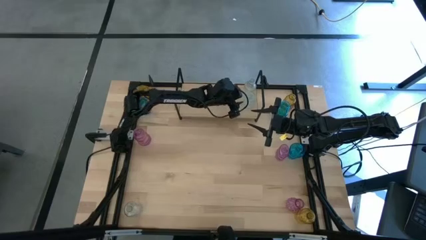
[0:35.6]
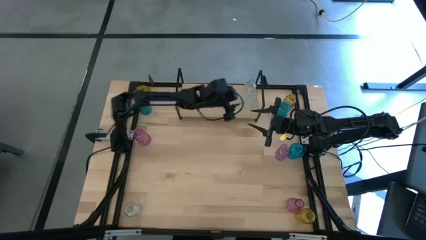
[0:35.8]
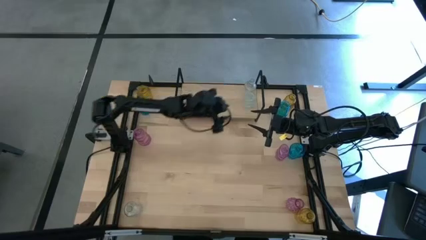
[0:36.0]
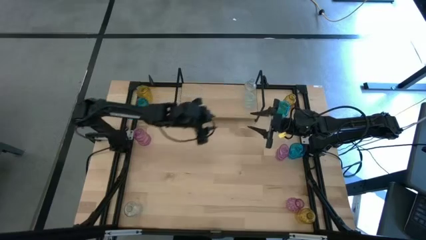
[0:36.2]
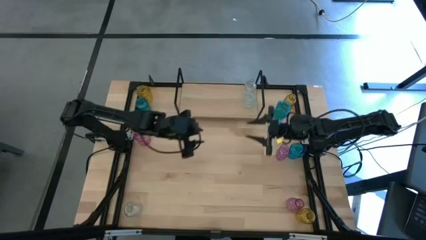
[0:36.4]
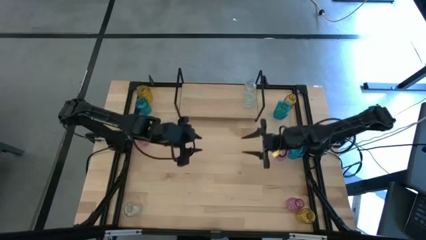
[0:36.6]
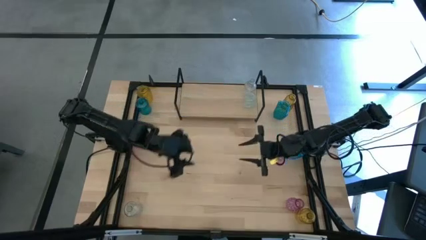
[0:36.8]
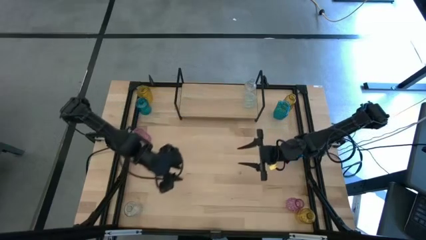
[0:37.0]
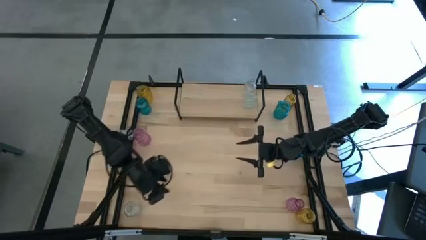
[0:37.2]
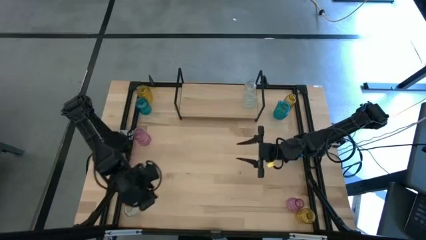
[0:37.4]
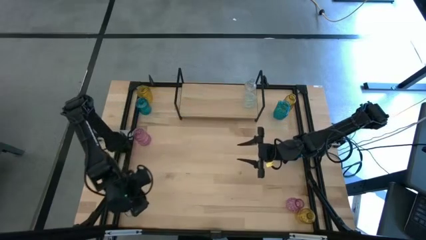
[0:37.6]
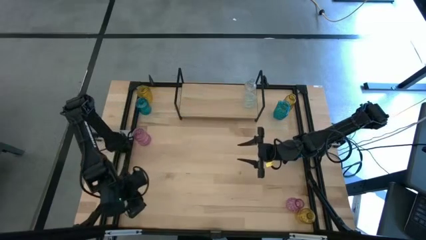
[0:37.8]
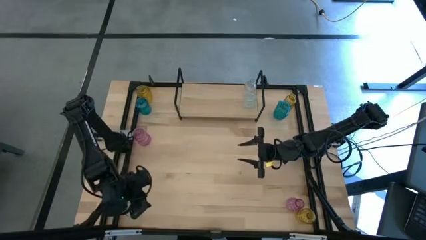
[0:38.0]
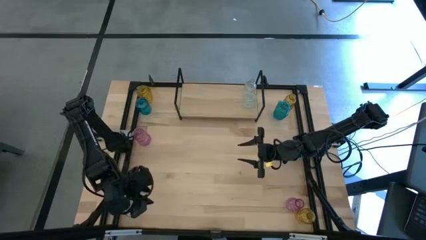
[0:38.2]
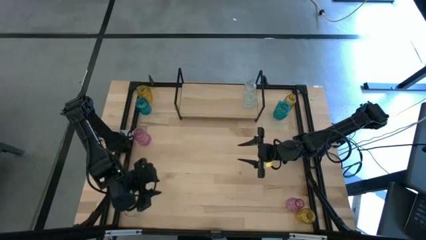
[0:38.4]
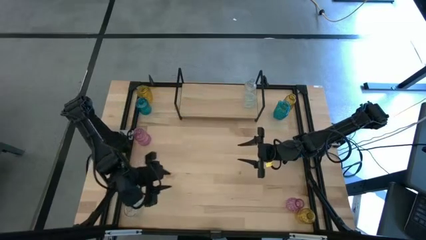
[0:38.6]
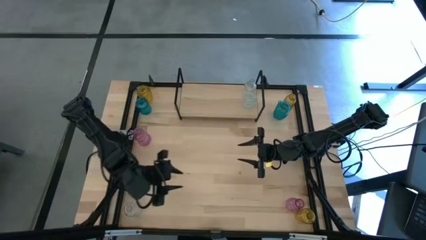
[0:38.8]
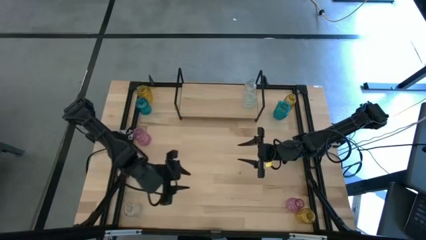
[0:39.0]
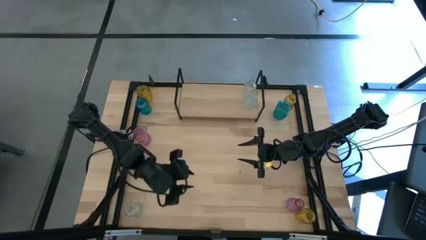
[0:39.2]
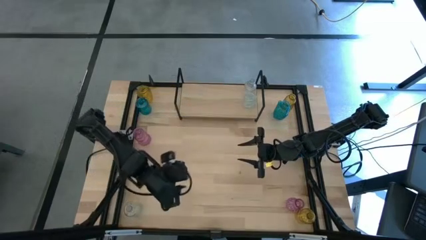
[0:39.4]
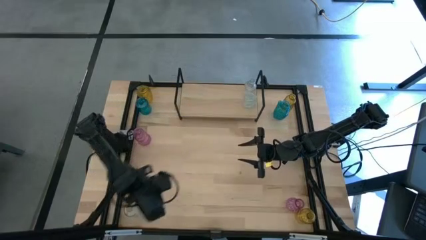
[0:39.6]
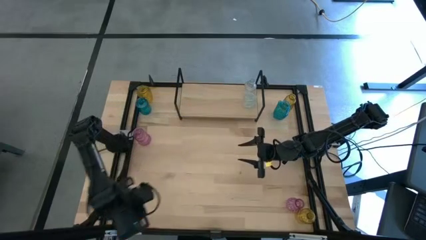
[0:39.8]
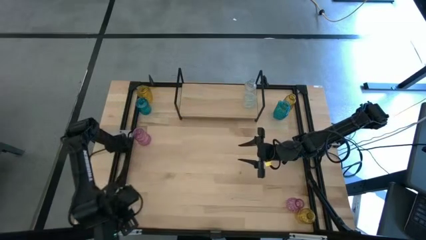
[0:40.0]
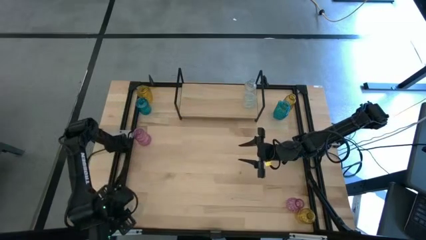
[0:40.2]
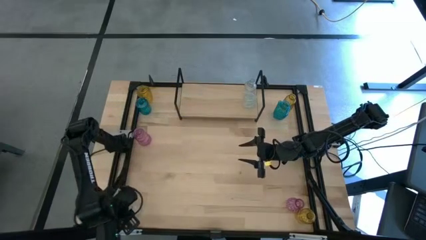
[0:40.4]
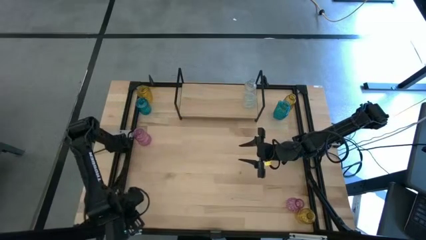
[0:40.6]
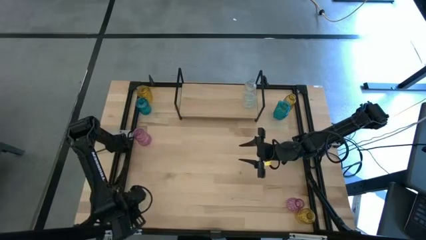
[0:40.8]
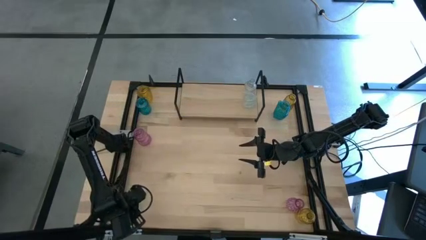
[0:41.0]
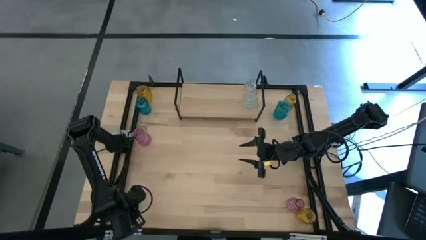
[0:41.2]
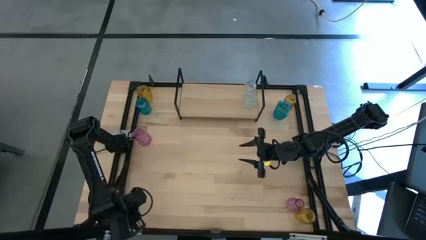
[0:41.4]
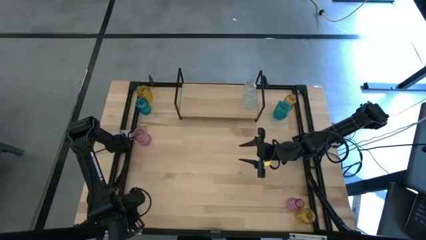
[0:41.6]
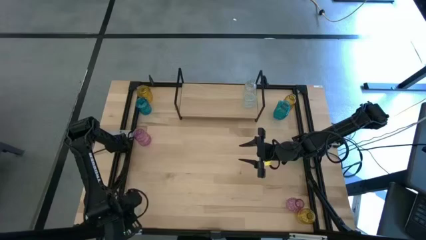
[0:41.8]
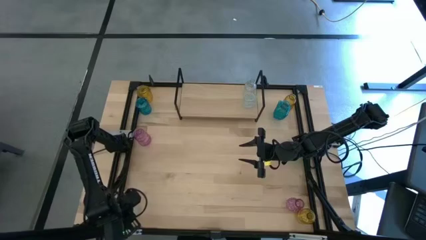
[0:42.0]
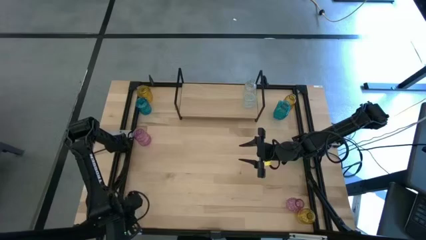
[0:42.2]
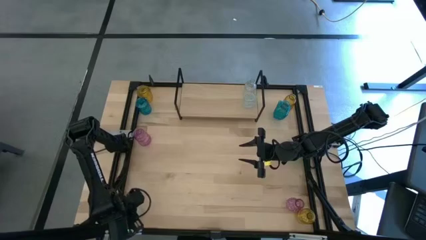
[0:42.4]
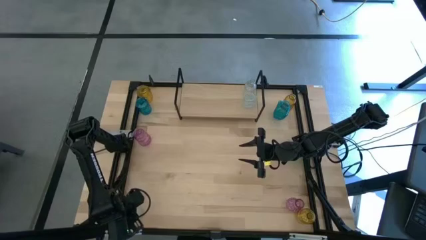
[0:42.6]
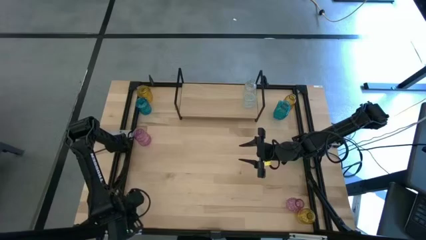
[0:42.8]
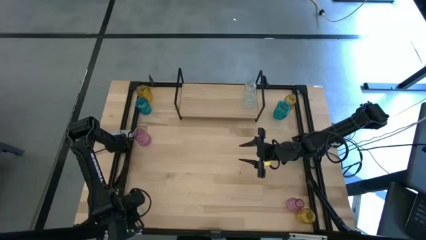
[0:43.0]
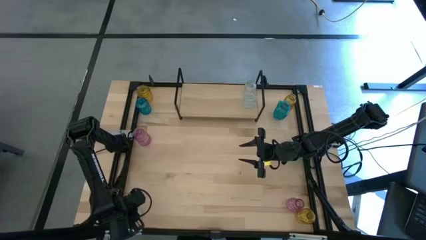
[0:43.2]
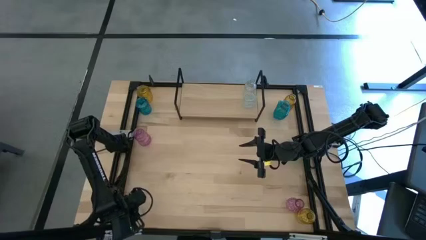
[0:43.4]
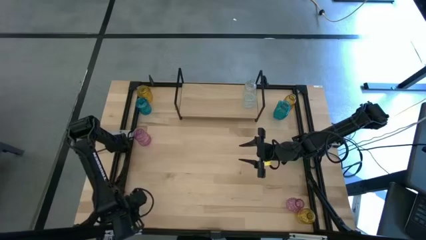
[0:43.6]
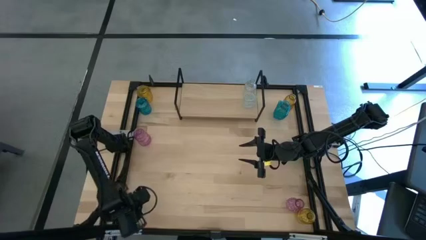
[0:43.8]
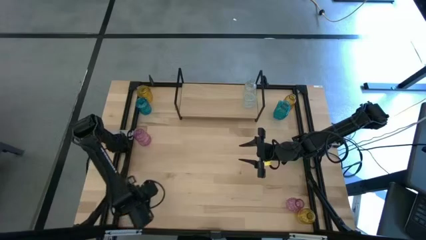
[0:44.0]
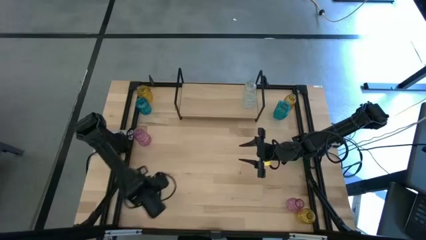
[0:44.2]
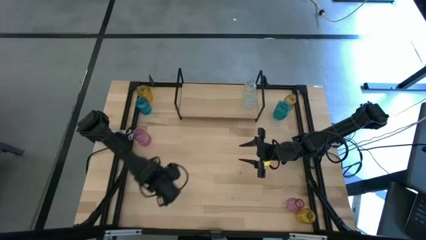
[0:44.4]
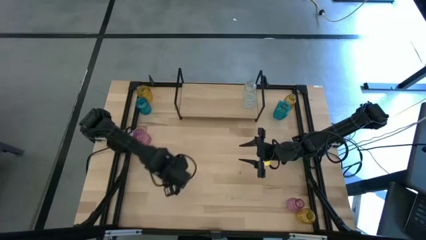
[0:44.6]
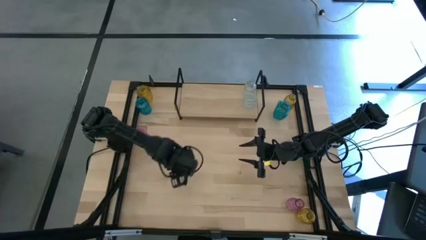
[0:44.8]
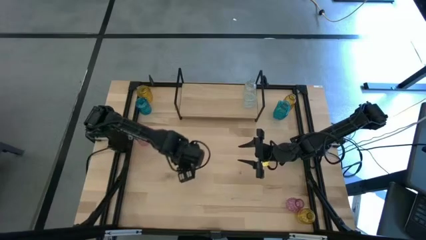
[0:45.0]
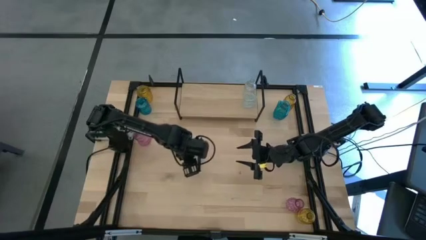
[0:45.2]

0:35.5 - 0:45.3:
Task: sort vases onto shelf
Put the transparent vase on the shelf aligned with the other transparent vases

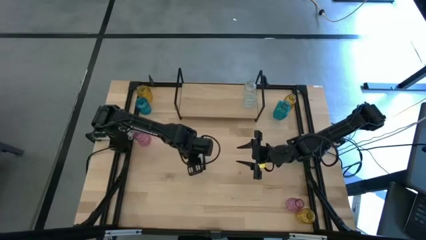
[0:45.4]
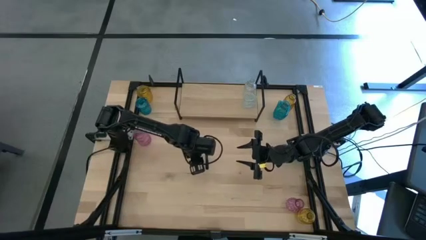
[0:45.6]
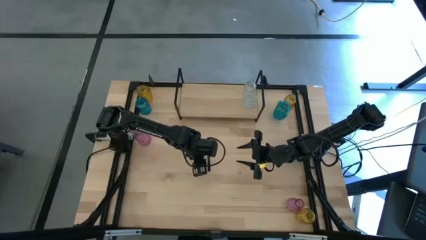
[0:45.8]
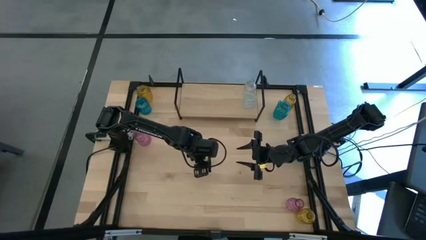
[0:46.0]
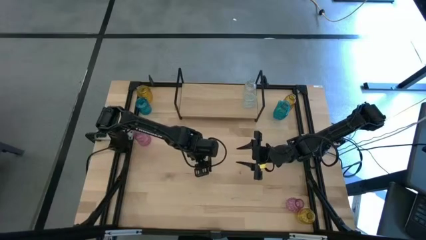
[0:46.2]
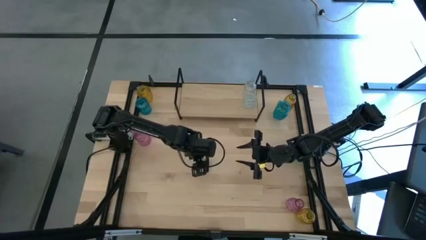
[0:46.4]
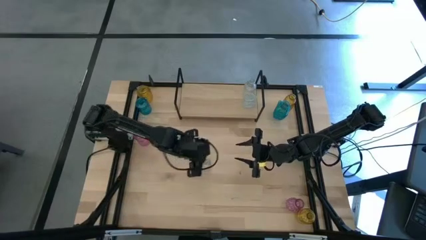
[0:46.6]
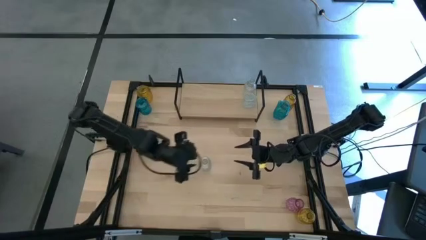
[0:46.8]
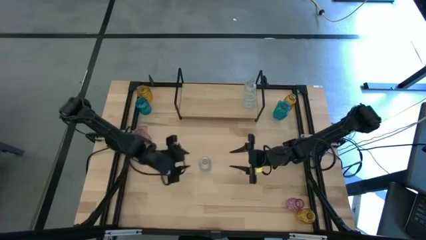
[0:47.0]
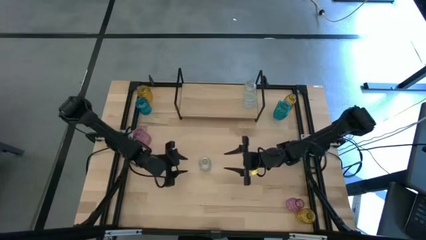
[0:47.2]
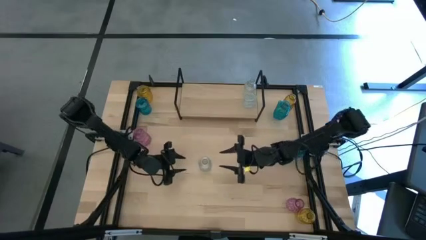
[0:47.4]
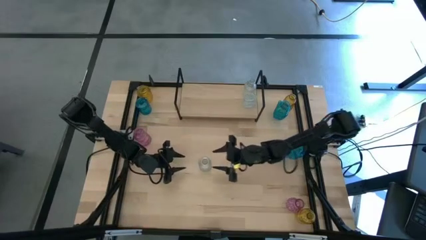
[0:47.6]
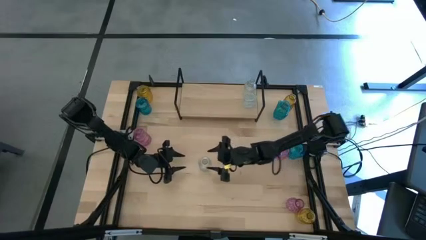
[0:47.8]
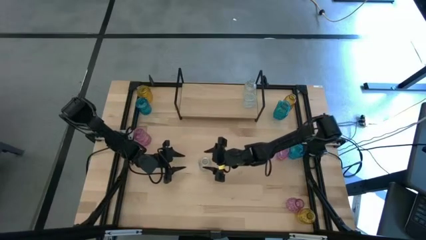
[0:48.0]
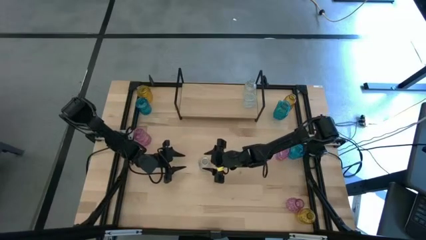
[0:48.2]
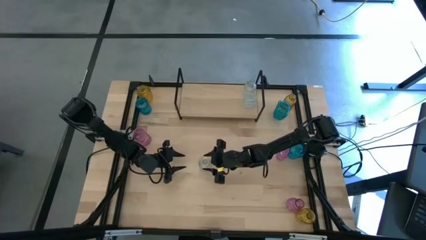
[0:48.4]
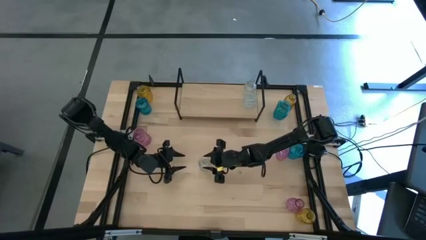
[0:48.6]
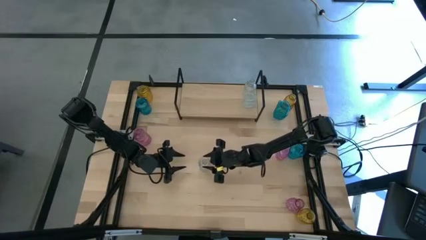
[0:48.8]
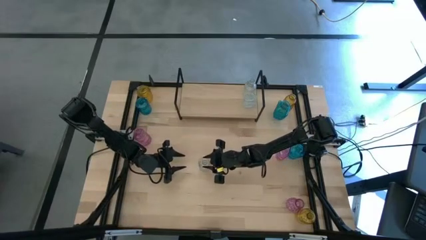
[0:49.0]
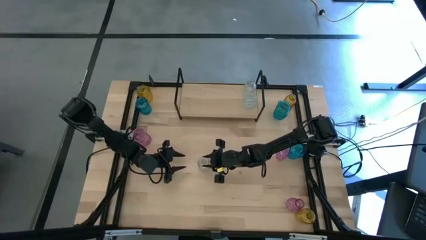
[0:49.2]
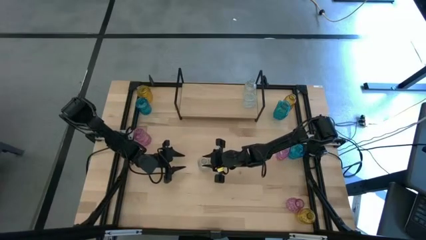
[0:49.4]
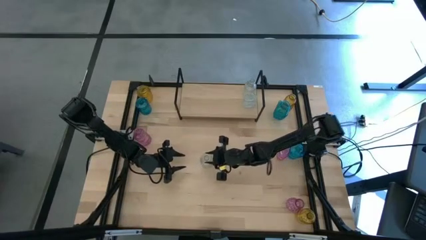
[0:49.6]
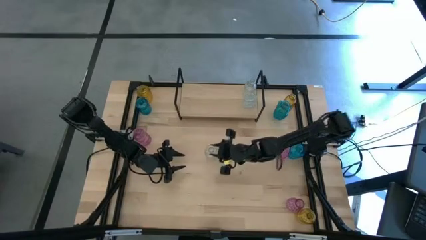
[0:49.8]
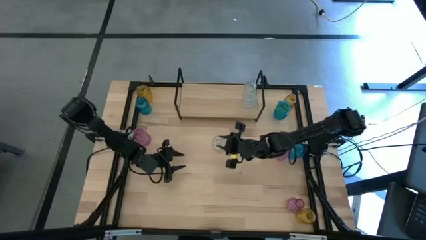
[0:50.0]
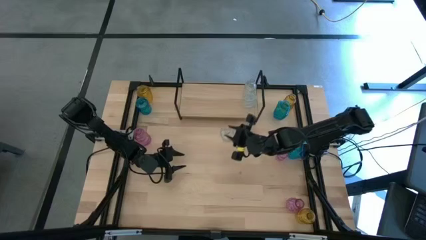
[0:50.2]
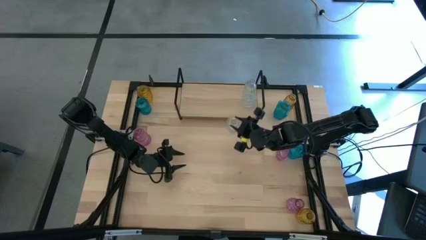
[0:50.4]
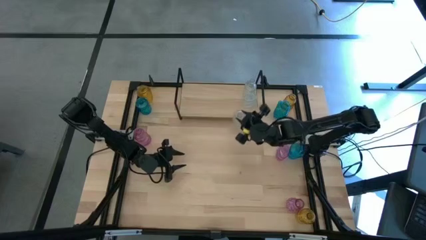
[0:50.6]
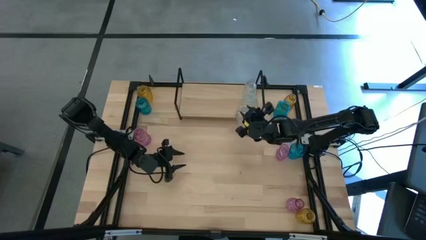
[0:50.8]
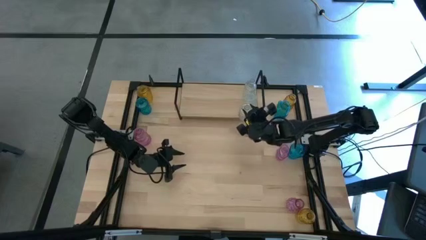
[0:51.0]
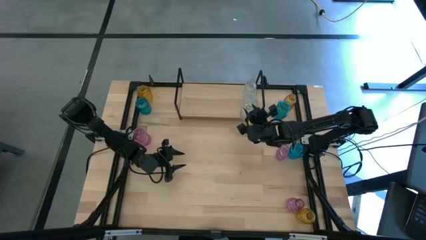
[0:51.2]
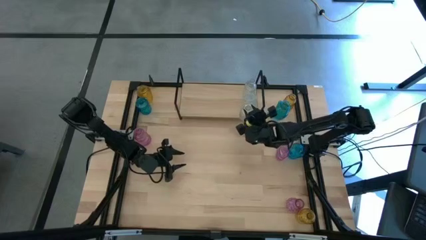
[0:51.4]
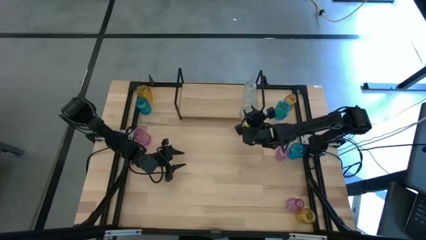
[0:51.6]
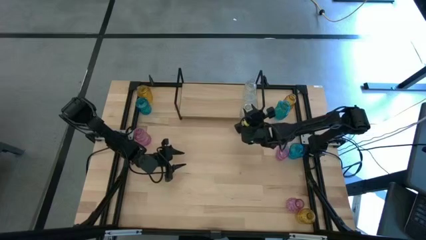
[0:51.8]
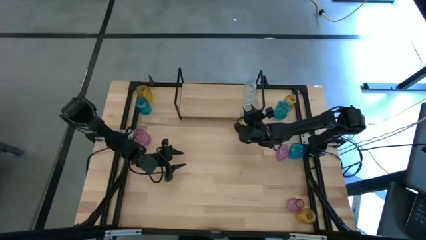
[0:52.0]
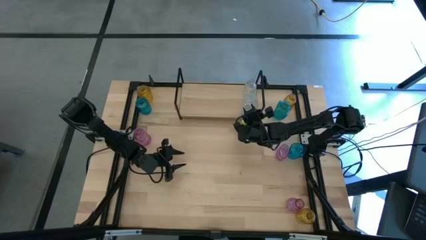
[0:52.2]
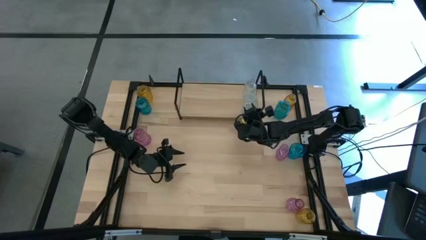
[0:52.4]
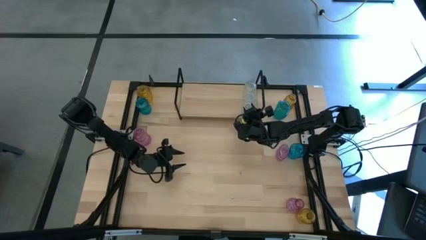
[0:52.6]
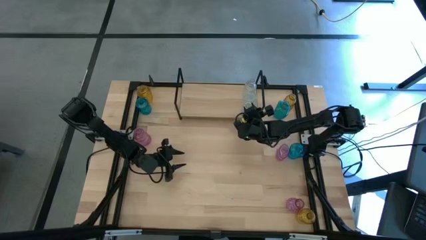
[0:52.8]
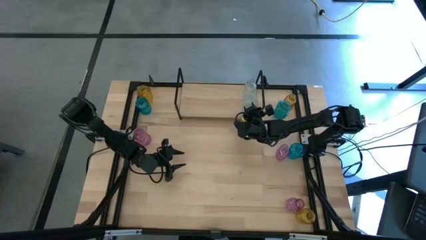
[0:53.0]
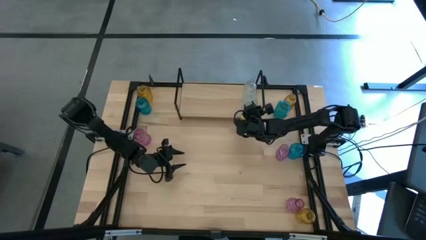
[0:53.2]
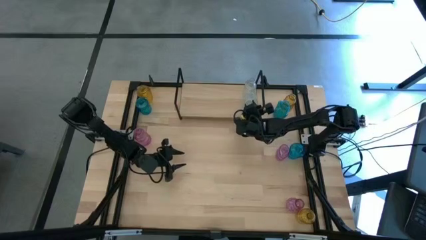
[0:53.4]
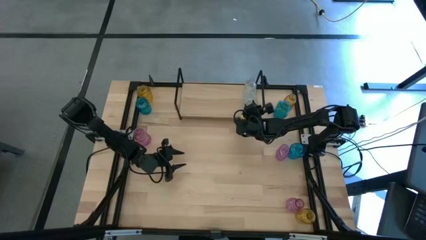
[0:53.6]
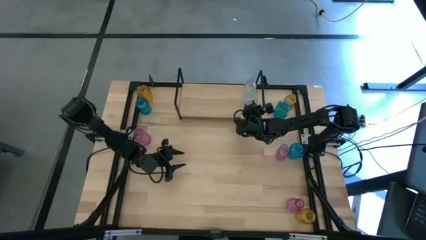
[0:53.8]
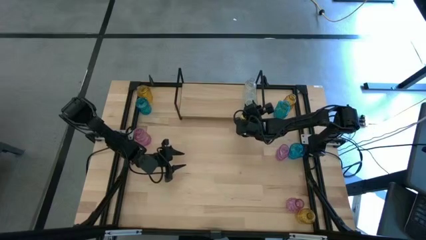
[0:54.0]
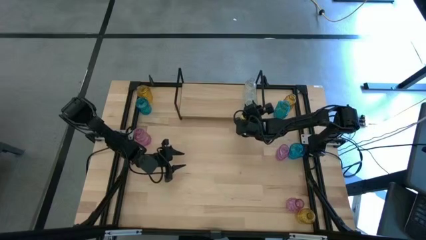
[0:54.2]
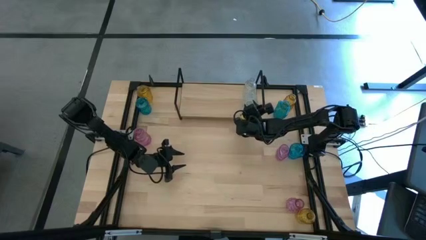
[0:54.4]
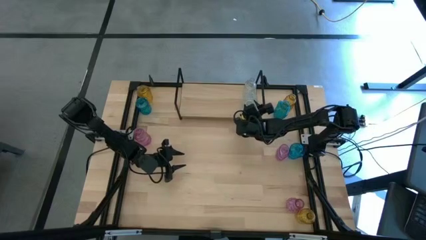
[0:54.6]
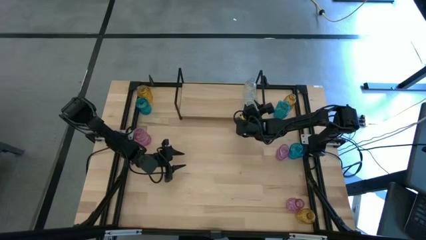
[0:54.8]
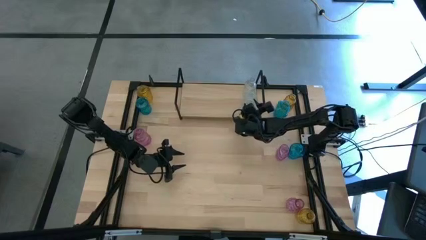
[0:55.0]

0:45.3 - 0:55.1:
Put the transparent vase on the shelf aligned with the other transparent vases
